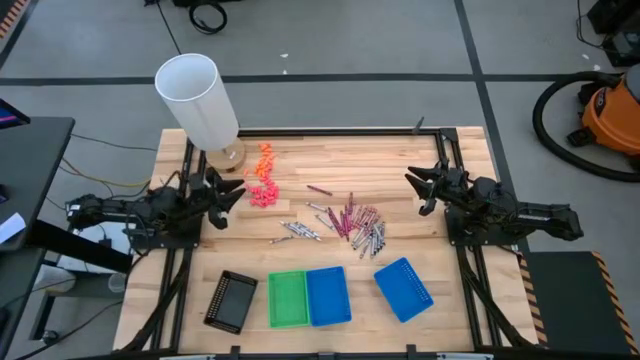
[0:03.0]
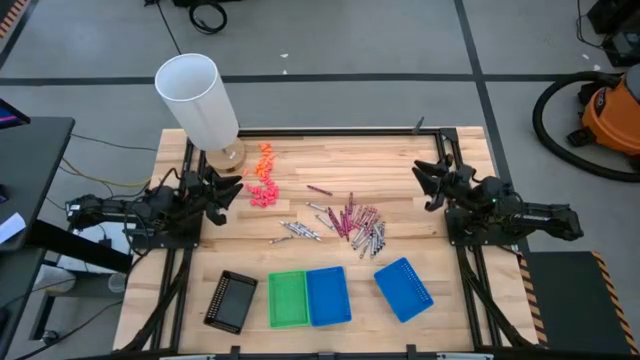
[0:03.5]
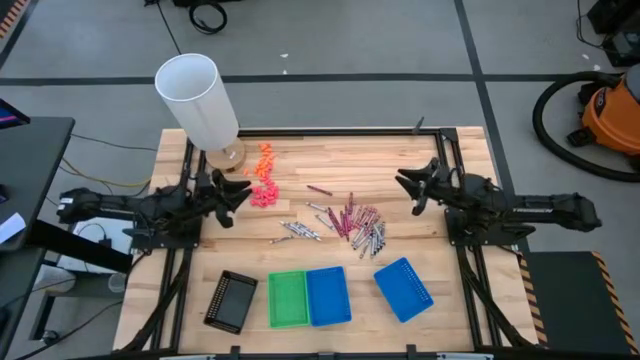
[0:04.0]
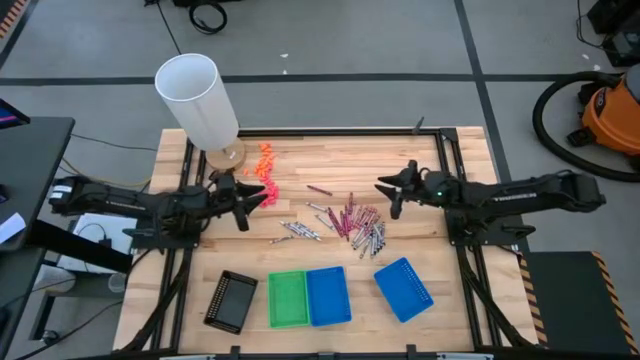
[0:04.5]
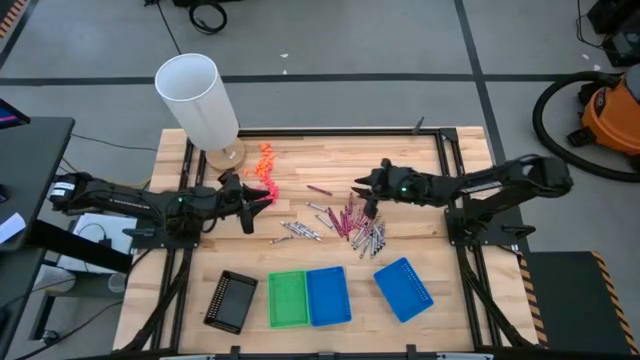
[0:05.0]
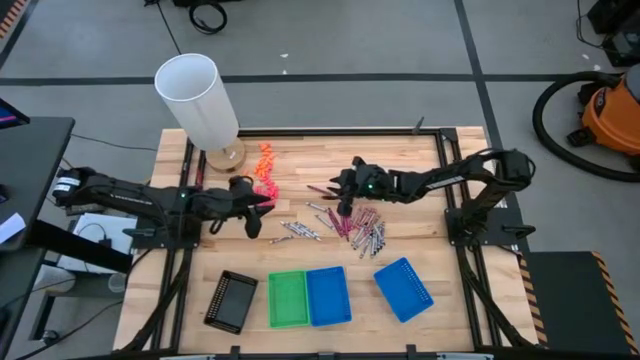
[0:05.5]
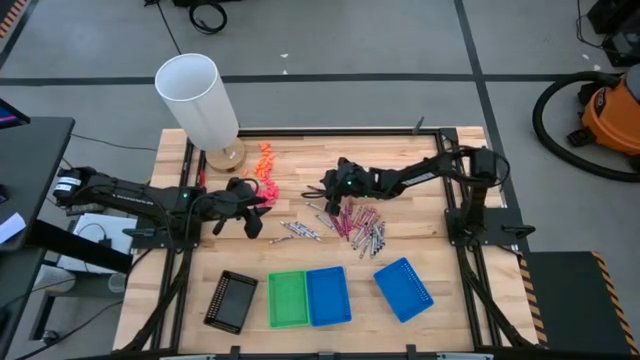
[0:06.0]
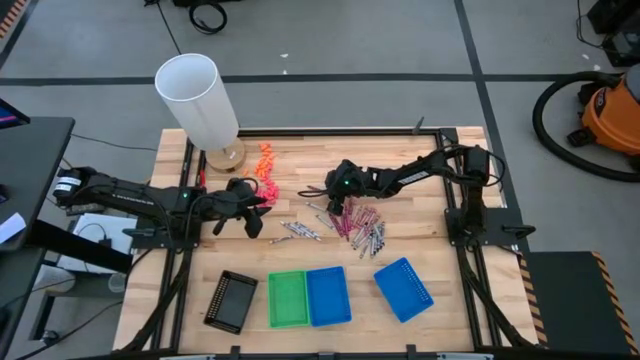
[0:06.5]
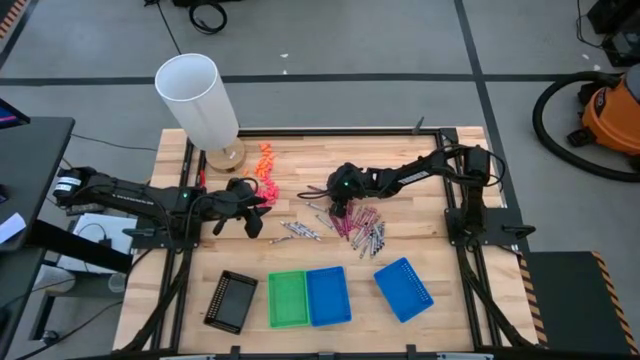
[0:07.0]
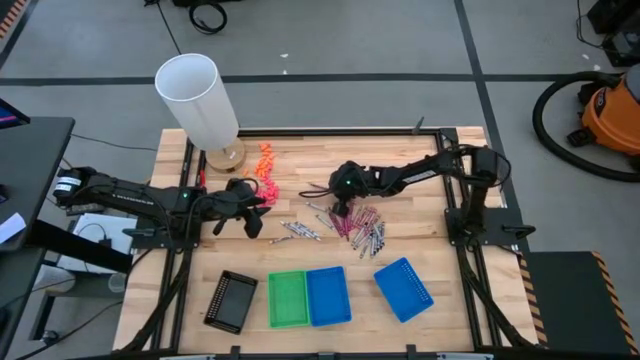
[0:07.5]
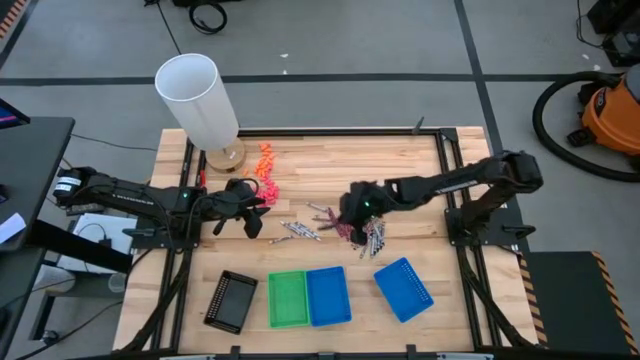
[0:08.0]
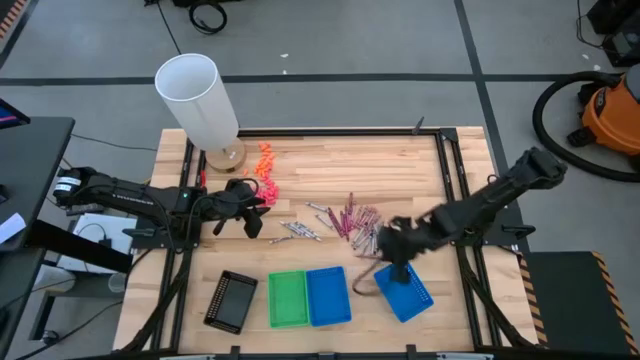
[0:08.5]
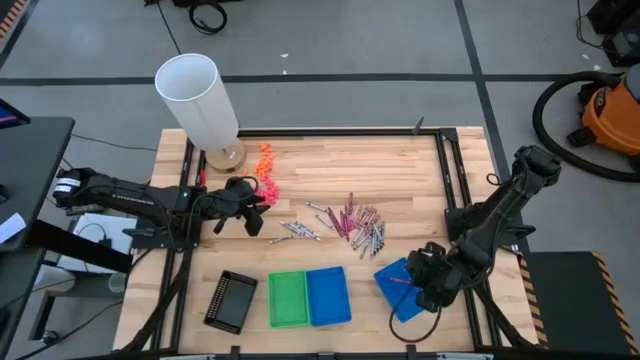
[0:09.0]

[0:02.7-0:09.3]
Task: Sort crayons
Put the red crayon into the right blue bin

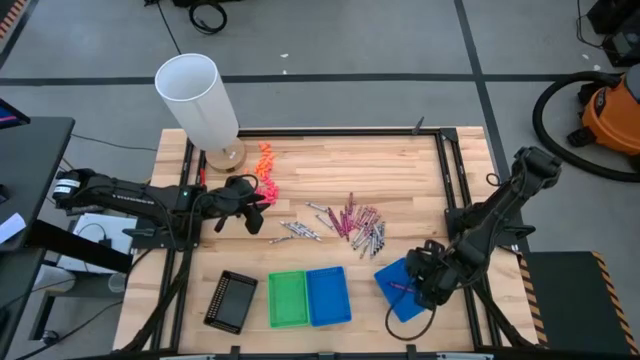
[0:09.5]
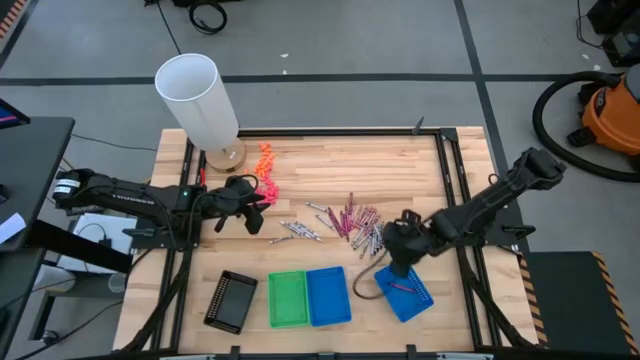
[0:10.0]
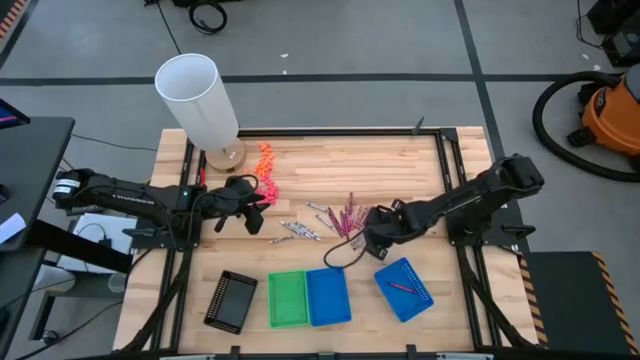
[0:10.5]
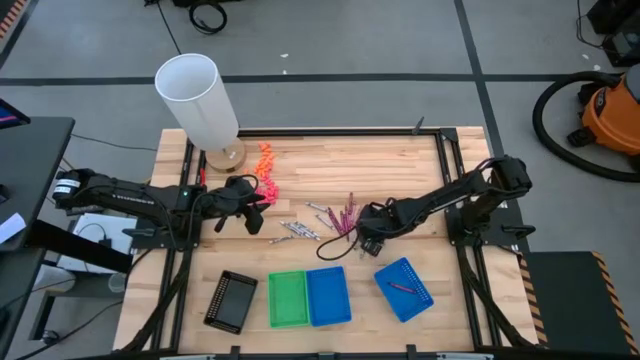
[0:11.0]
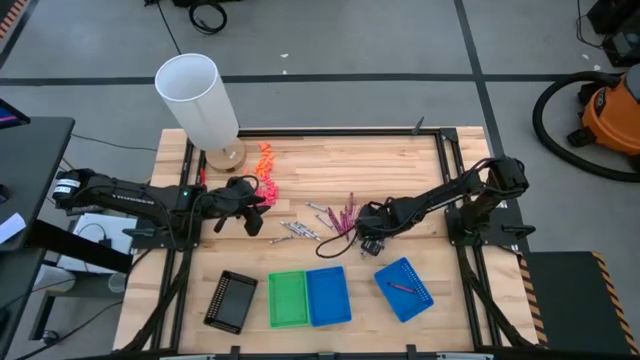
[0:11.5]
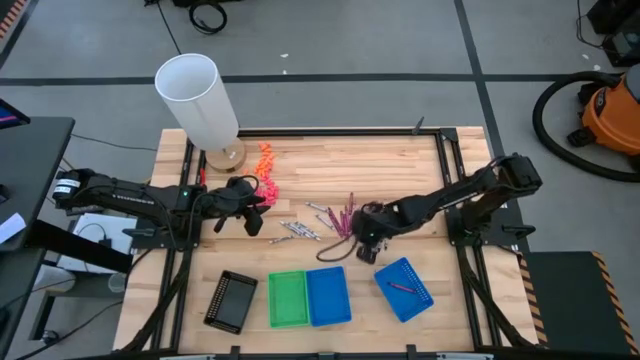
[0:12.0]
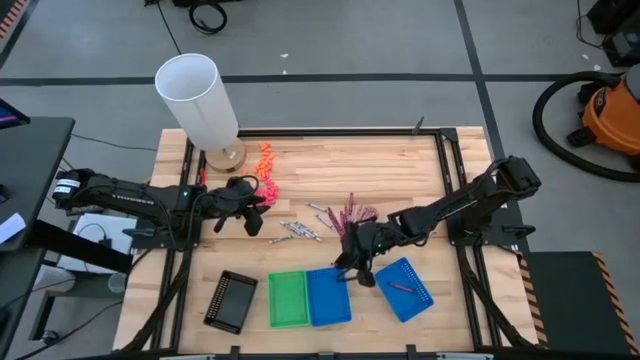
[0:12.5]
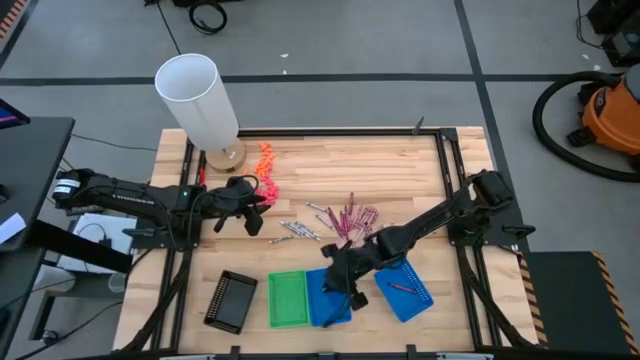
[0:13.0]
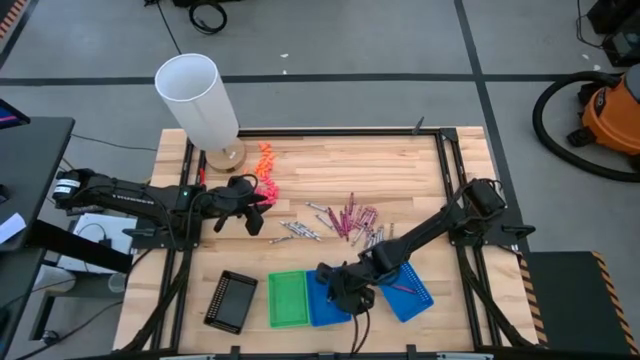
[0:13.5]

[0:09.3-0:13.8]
Put the black crayon into the left blue bin

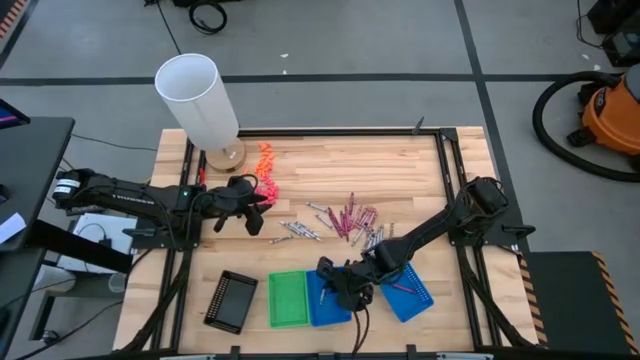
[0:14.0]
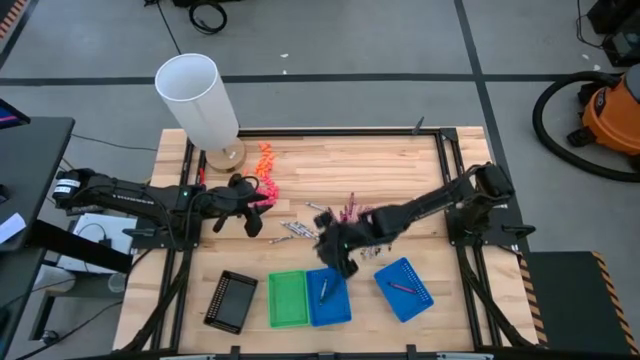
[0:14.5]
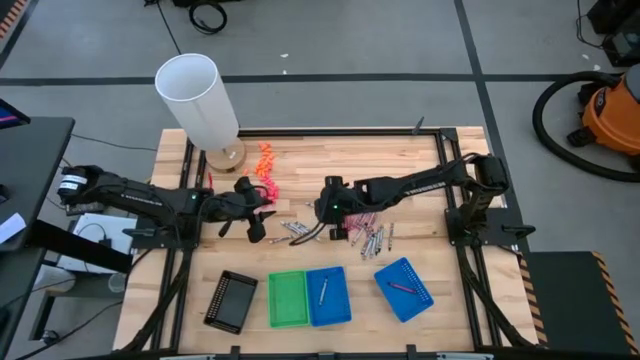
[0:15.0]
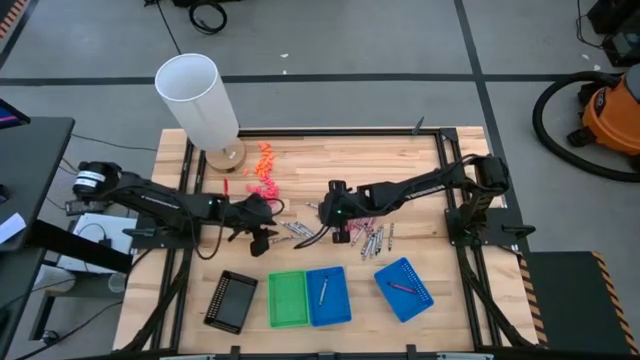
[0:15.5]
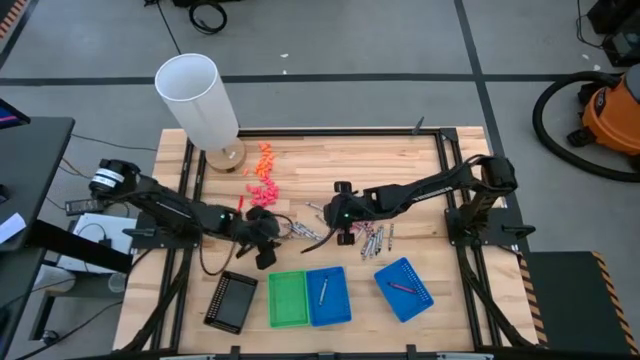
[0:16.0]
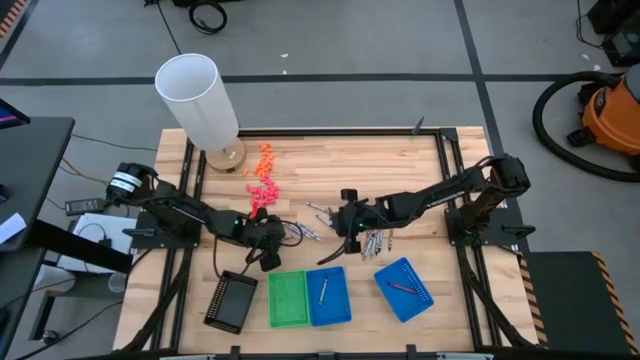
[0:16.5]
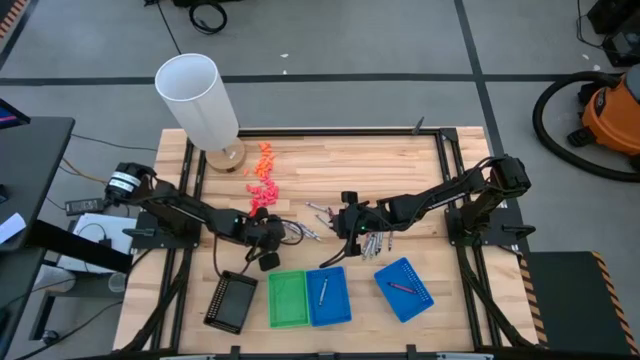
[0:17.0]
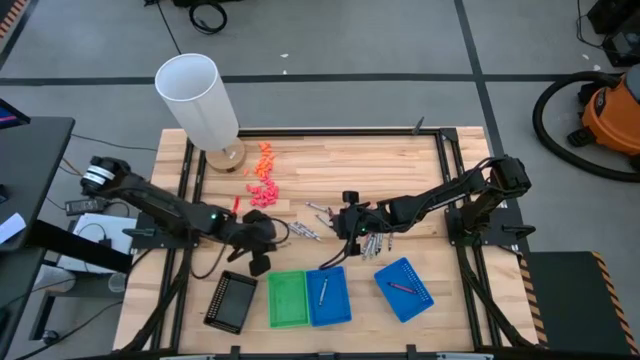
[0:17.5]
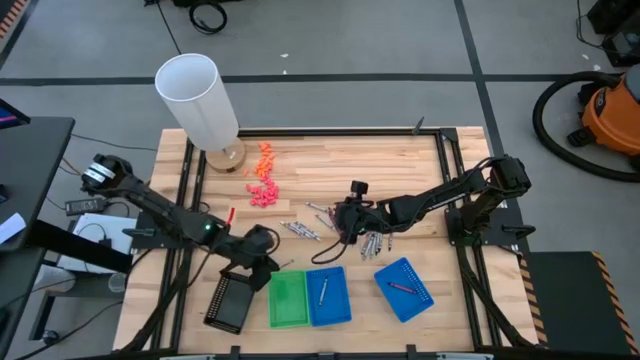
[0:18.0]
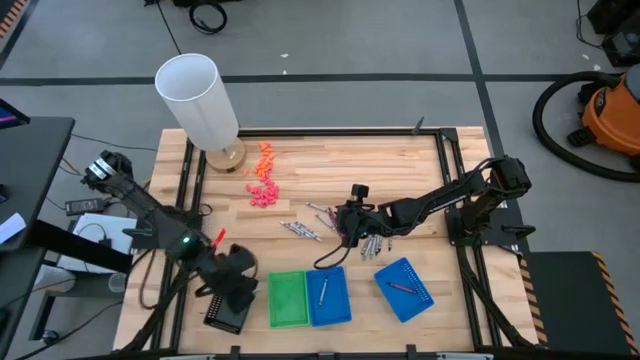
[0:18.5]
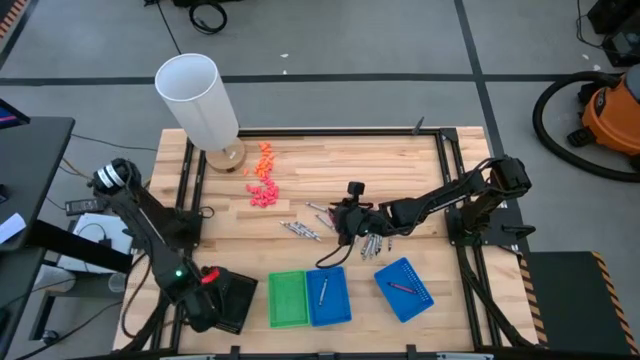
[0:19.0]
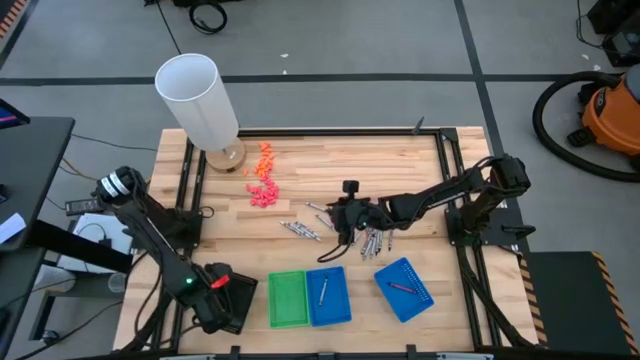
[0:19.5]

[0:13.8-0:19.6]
Put the white crayon into the black bin

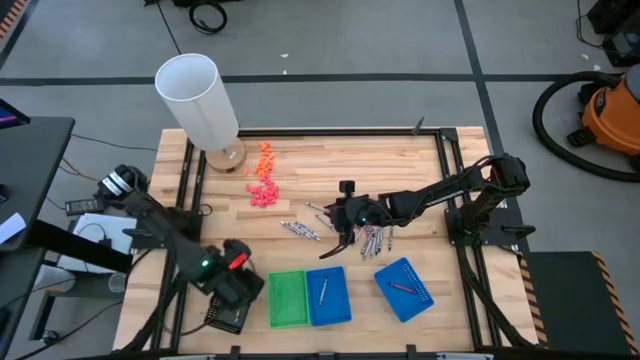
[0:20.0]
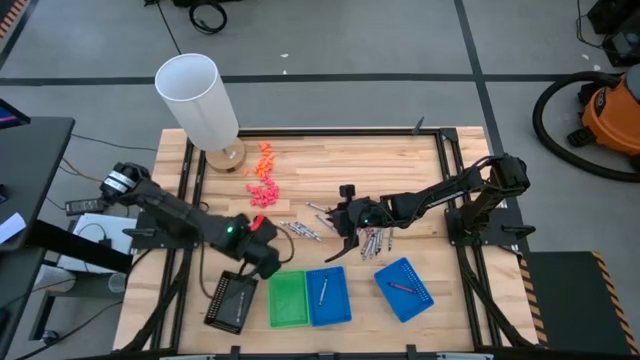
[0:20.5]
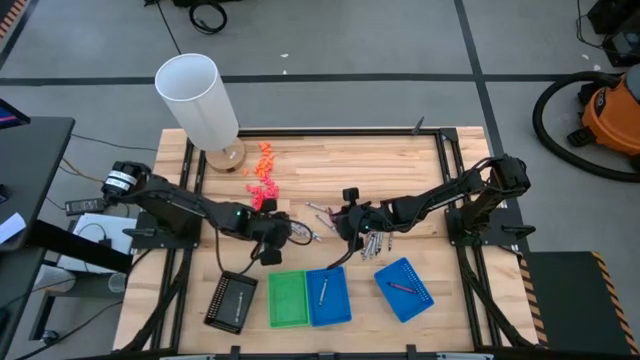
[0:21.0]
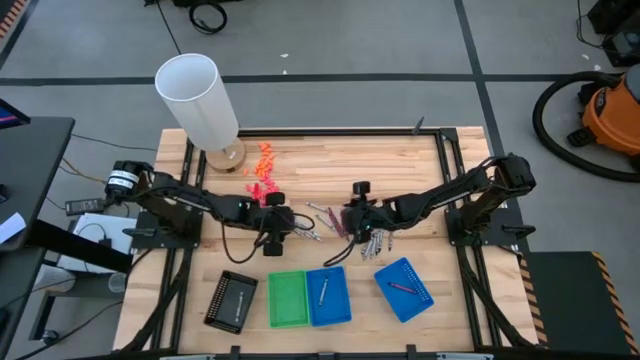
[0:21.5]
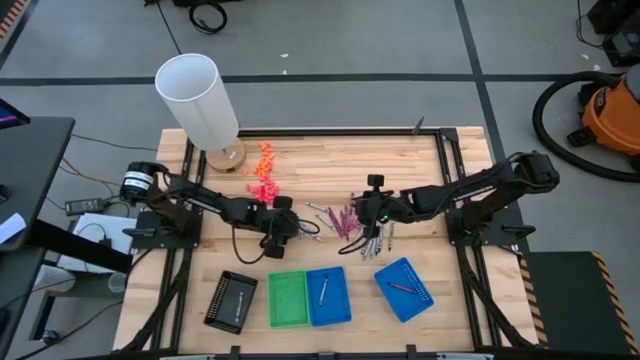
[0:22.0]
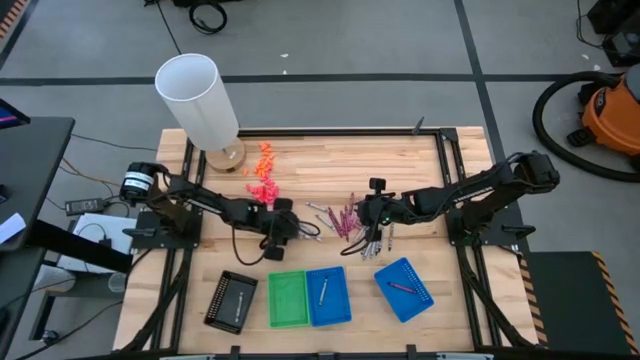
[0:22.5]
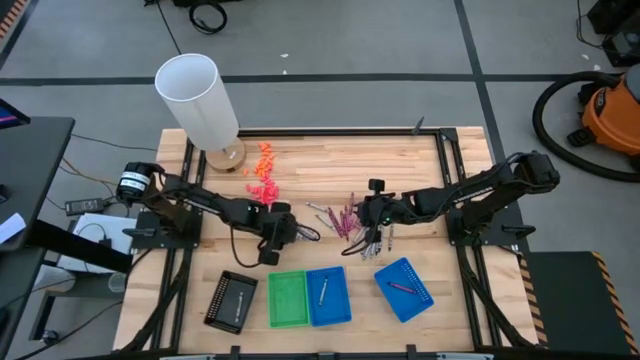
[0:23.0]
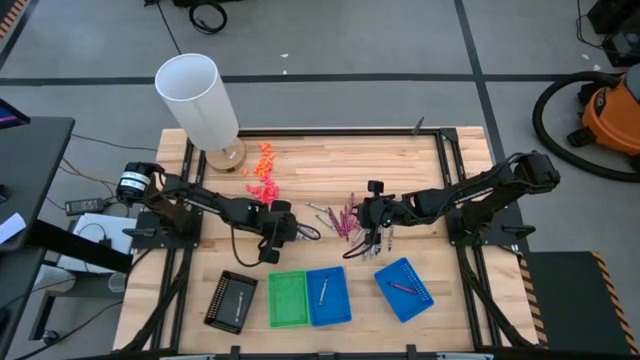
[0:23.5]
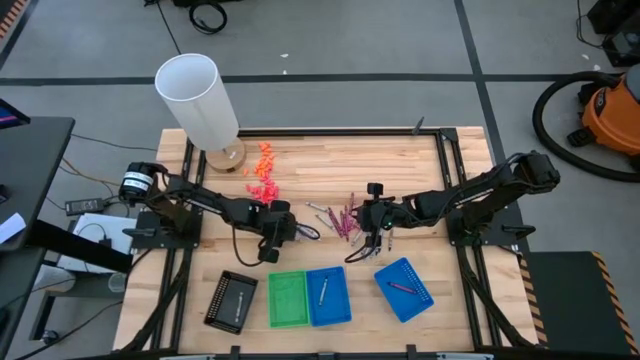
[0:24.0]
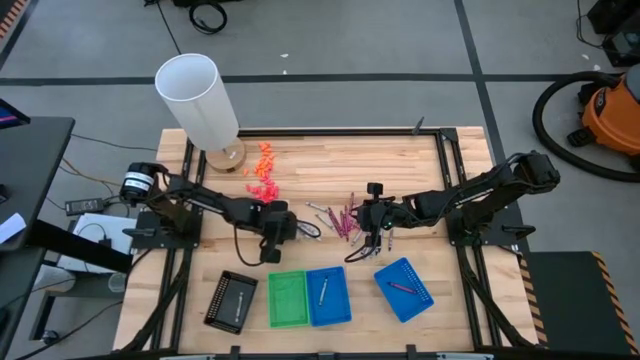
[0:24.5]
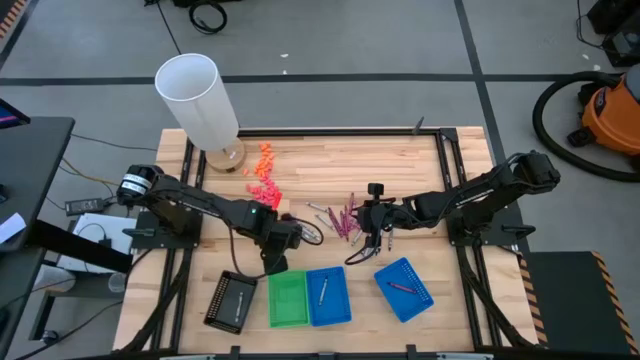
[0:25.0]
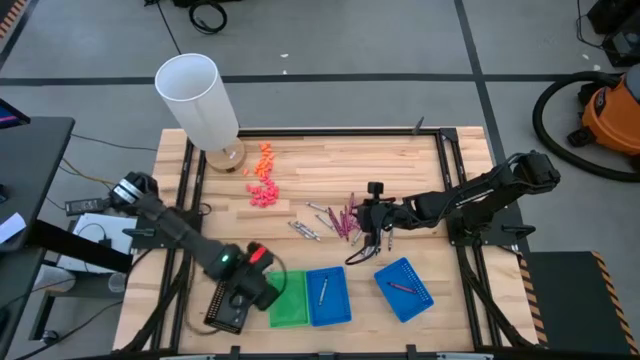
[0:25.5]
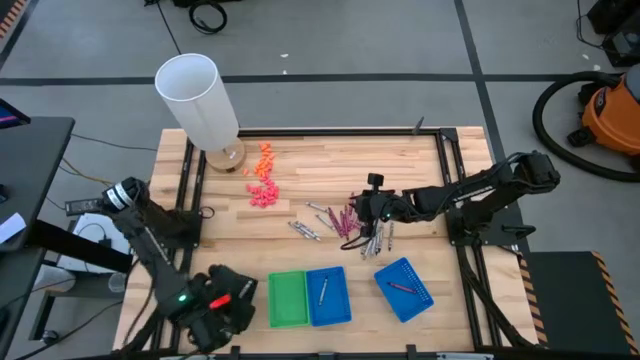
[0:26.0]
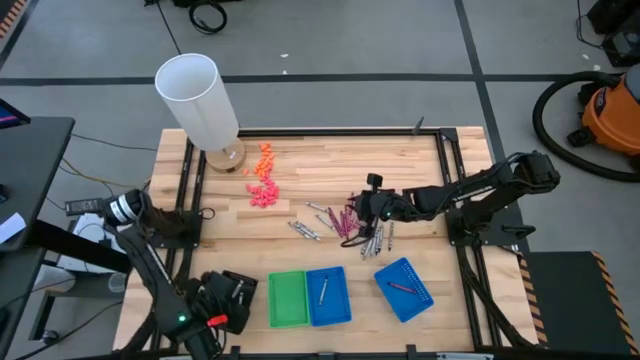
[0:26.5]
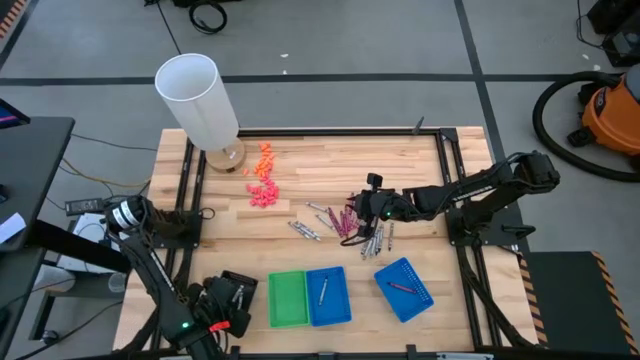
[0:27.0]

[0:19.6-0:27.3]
Put the white crayon into the black bin
